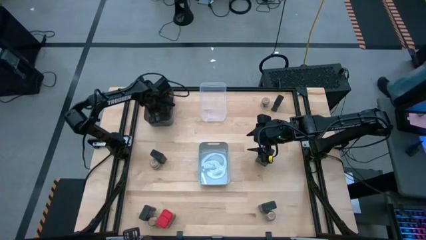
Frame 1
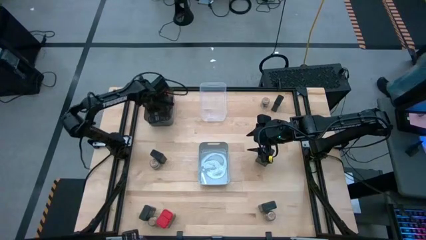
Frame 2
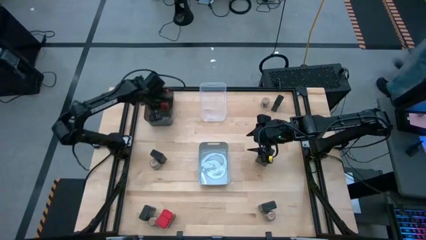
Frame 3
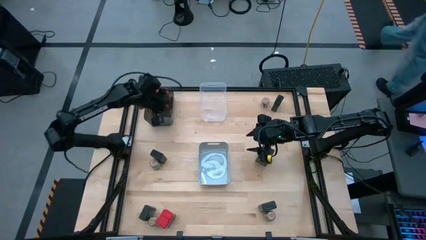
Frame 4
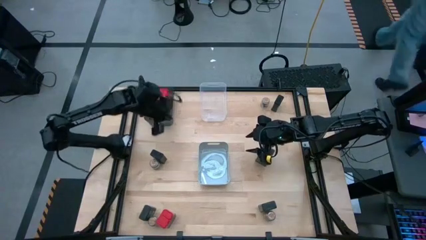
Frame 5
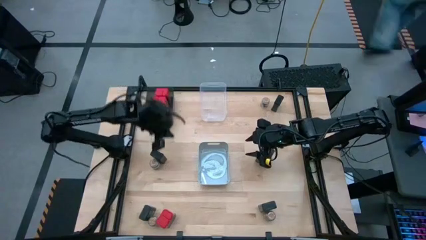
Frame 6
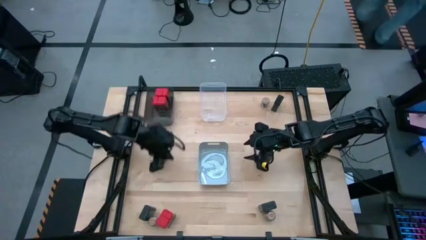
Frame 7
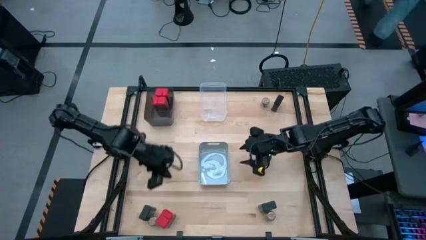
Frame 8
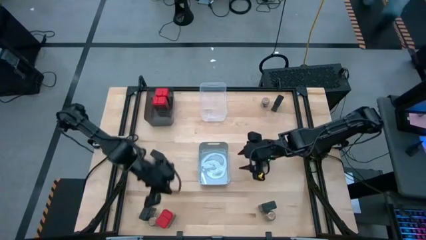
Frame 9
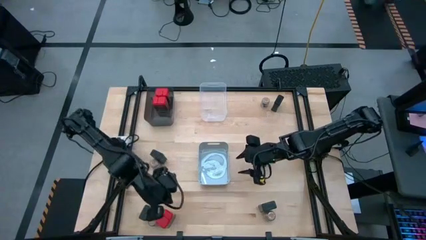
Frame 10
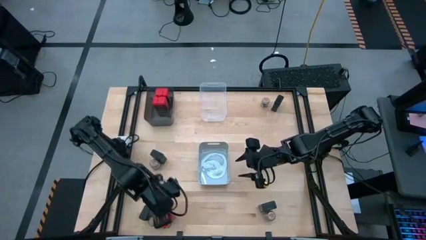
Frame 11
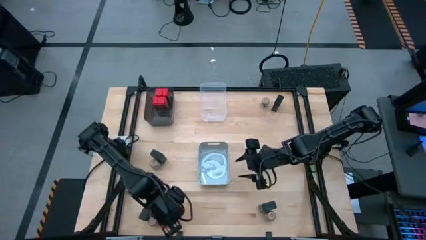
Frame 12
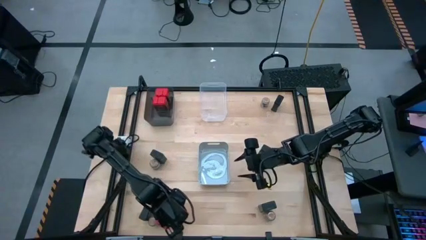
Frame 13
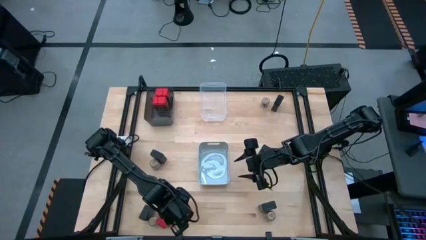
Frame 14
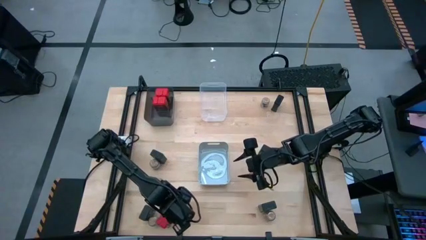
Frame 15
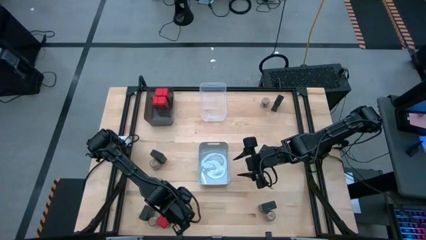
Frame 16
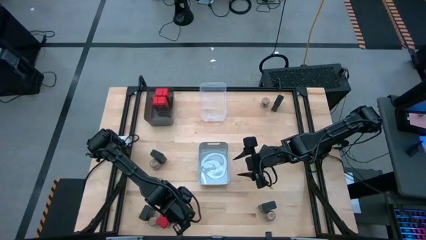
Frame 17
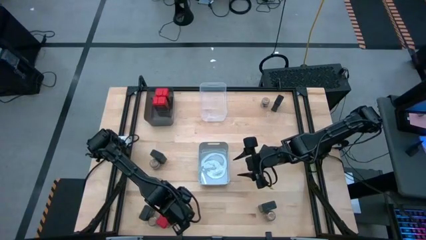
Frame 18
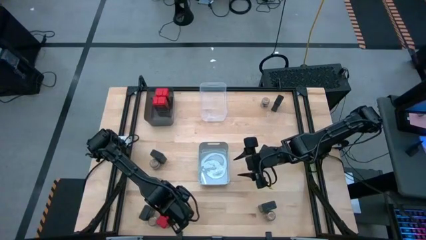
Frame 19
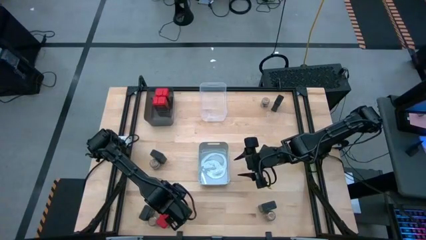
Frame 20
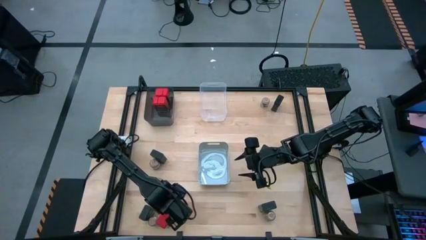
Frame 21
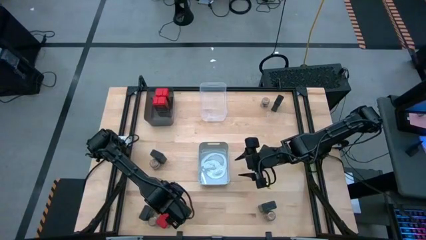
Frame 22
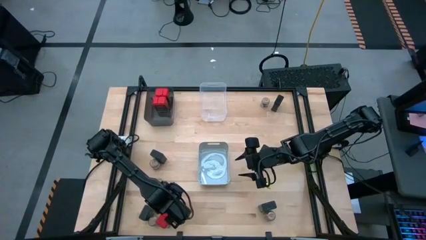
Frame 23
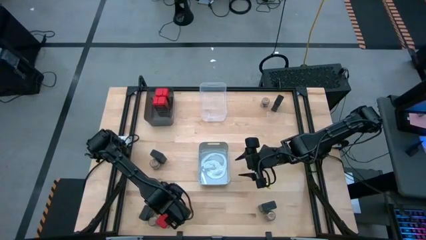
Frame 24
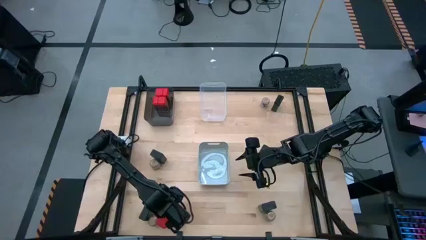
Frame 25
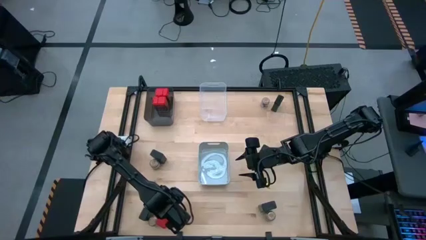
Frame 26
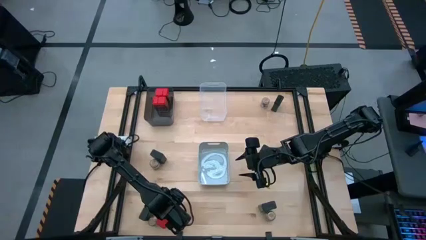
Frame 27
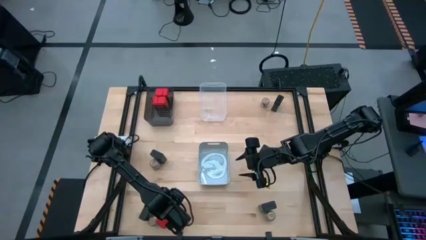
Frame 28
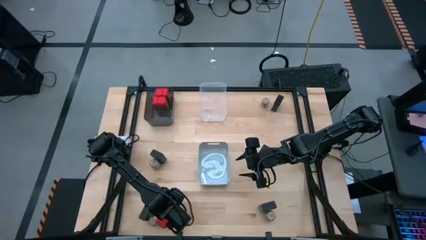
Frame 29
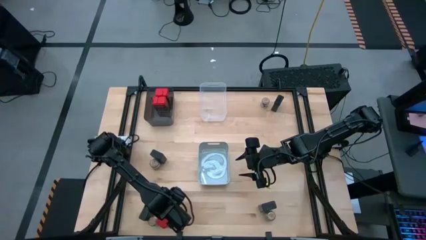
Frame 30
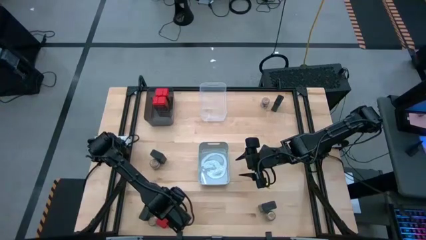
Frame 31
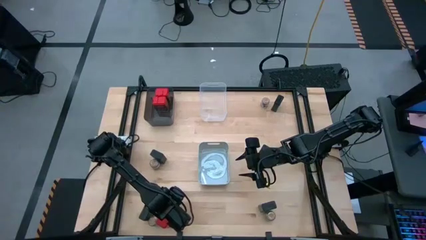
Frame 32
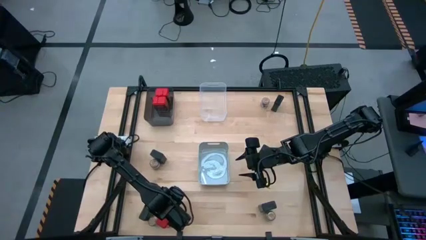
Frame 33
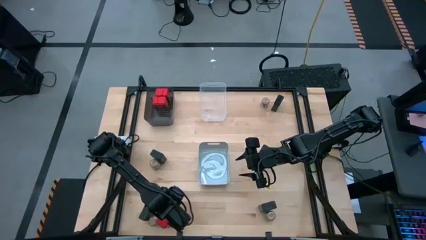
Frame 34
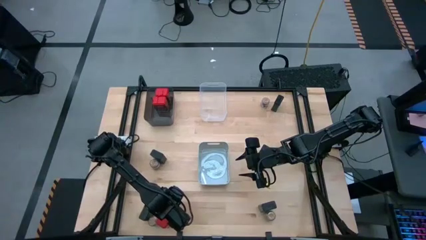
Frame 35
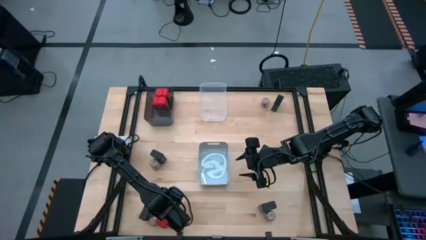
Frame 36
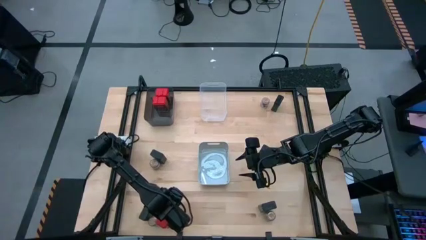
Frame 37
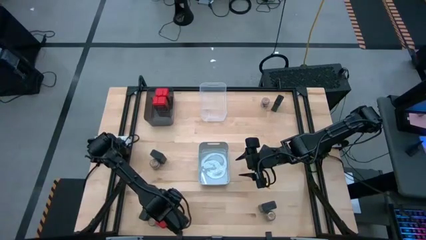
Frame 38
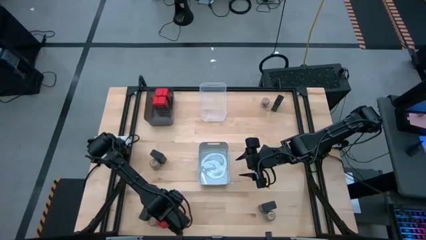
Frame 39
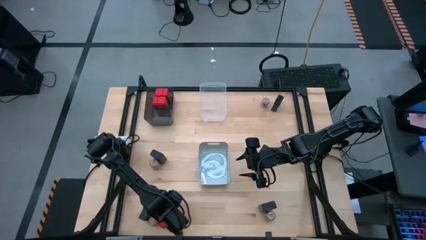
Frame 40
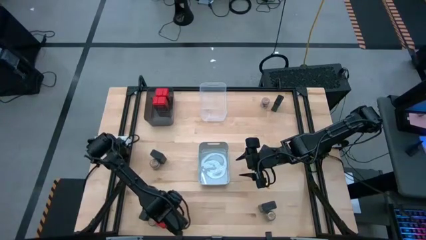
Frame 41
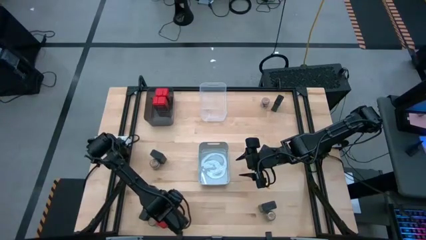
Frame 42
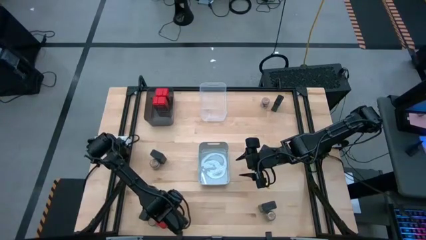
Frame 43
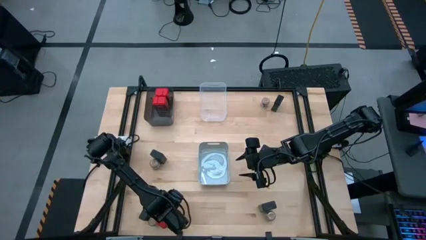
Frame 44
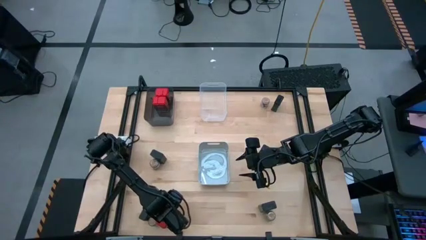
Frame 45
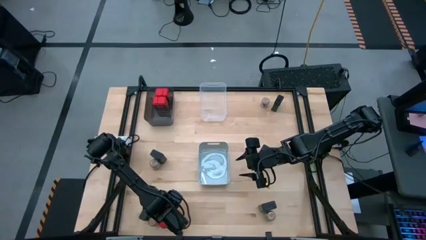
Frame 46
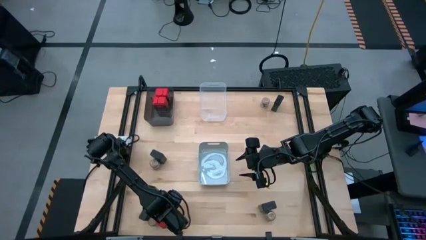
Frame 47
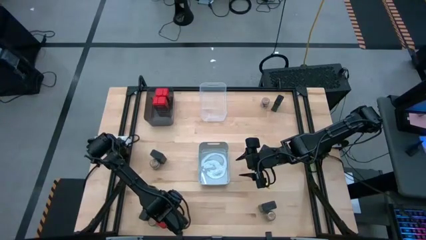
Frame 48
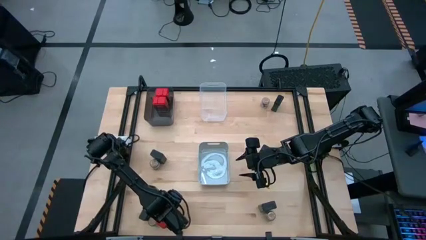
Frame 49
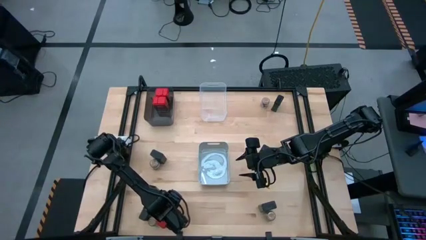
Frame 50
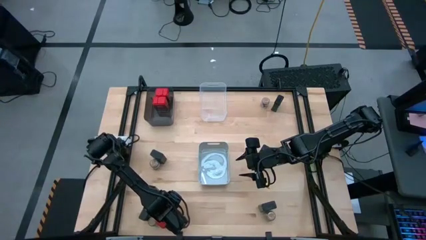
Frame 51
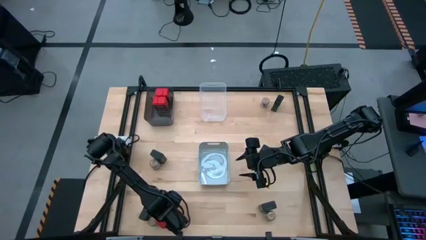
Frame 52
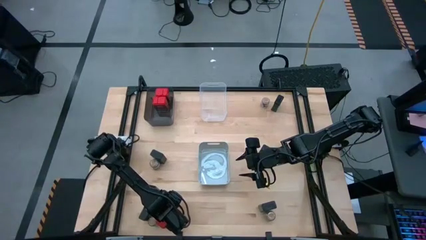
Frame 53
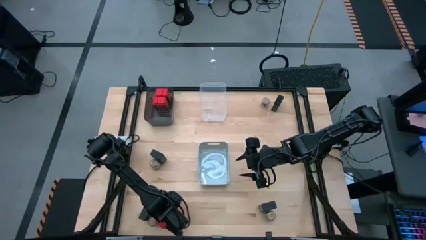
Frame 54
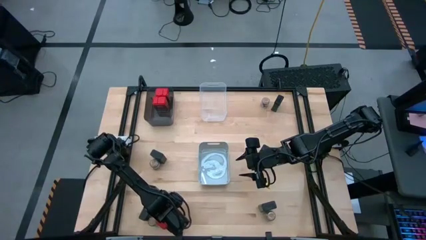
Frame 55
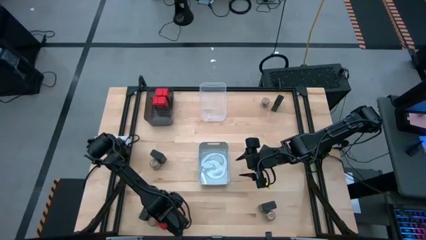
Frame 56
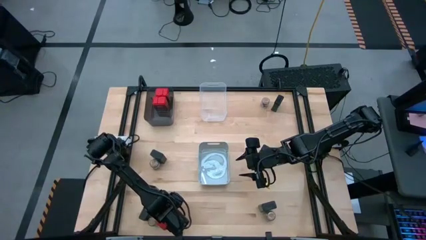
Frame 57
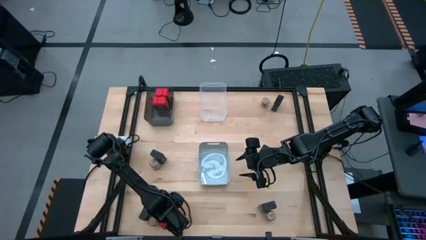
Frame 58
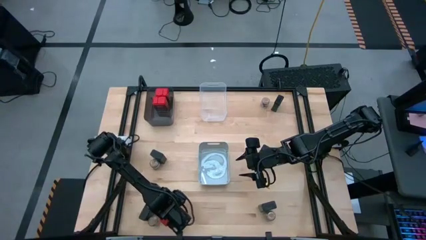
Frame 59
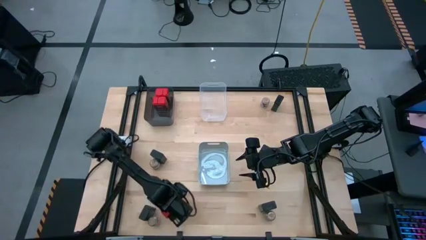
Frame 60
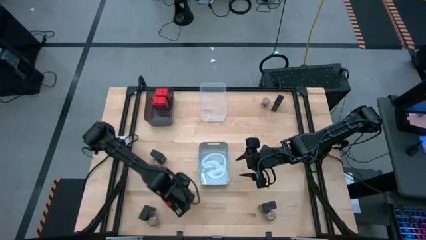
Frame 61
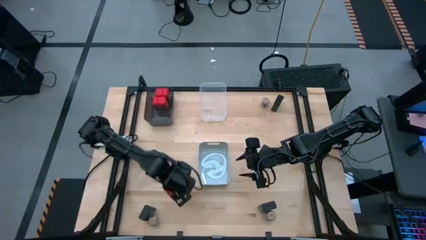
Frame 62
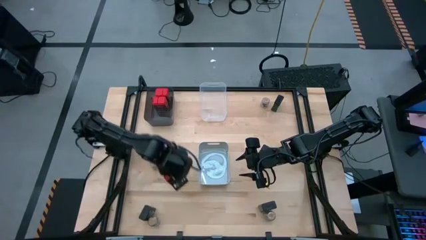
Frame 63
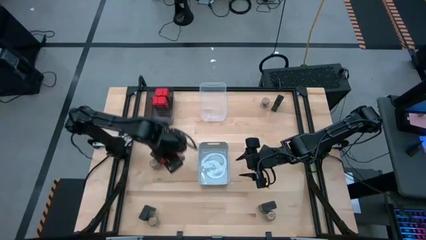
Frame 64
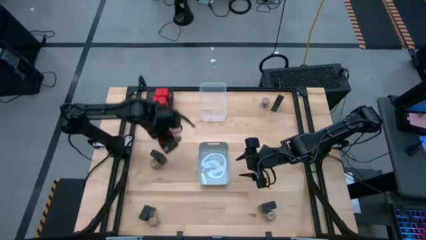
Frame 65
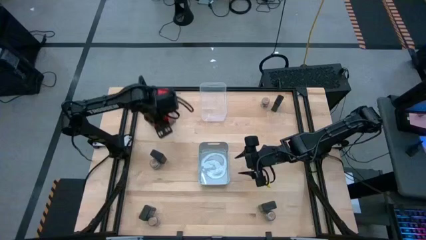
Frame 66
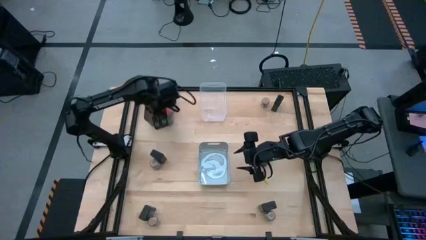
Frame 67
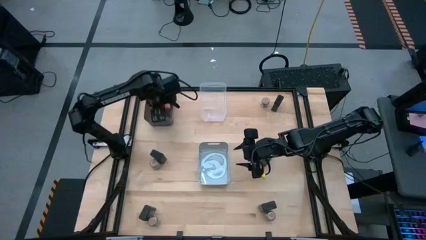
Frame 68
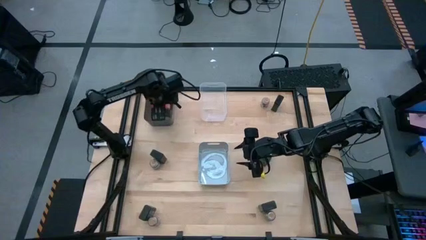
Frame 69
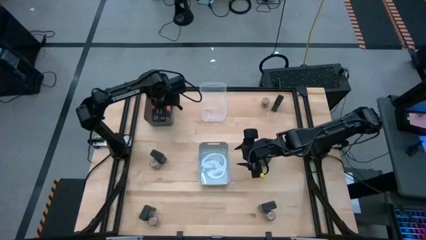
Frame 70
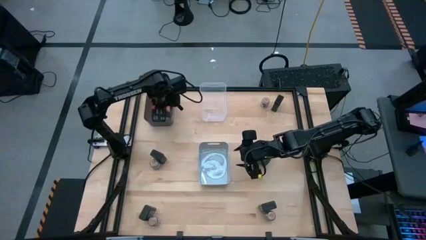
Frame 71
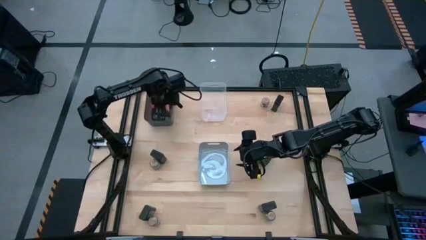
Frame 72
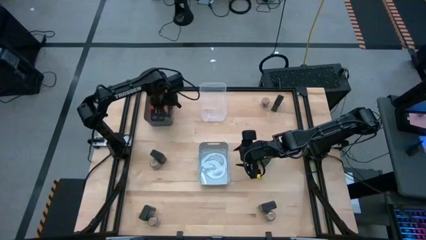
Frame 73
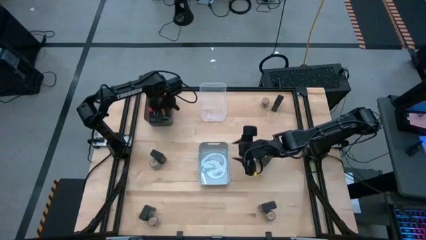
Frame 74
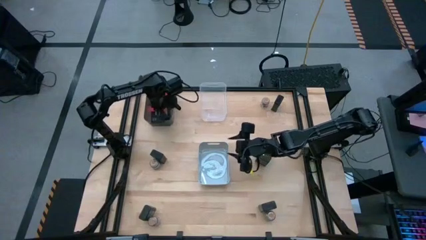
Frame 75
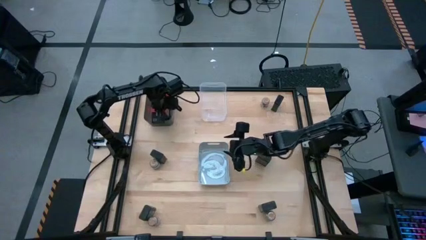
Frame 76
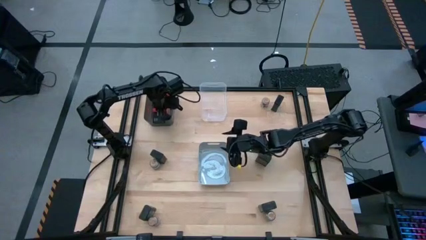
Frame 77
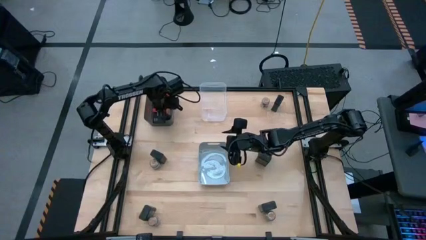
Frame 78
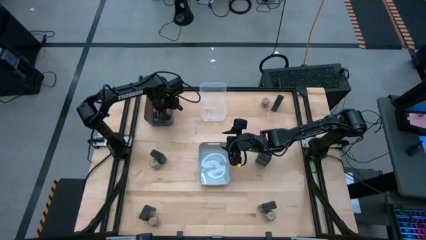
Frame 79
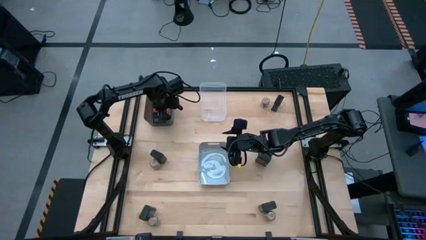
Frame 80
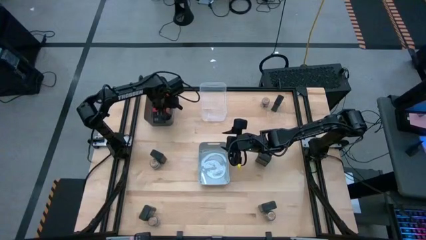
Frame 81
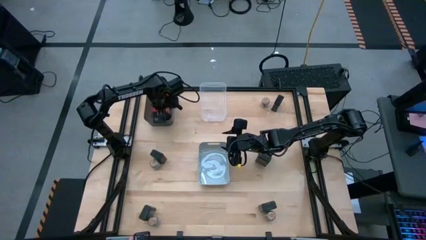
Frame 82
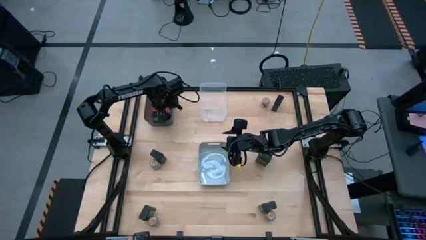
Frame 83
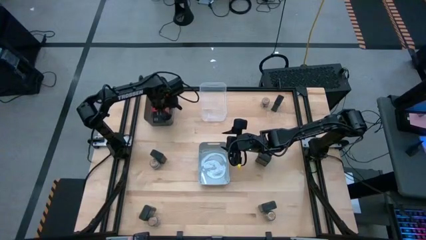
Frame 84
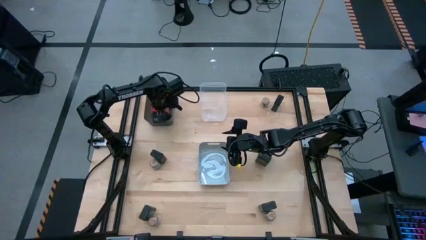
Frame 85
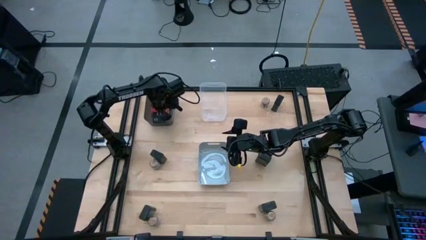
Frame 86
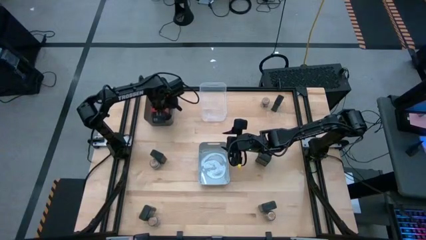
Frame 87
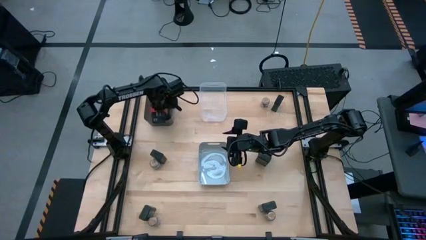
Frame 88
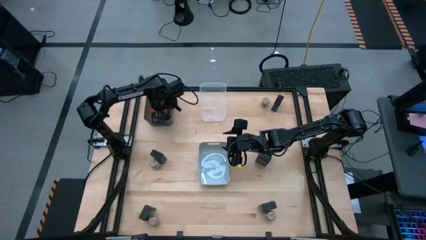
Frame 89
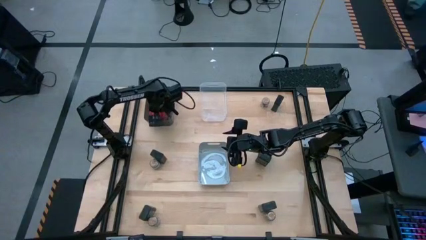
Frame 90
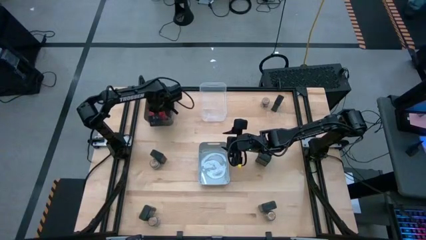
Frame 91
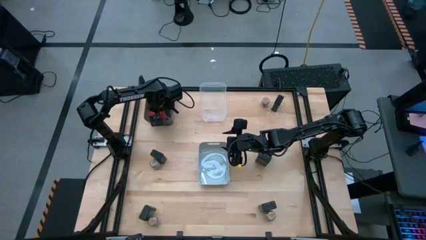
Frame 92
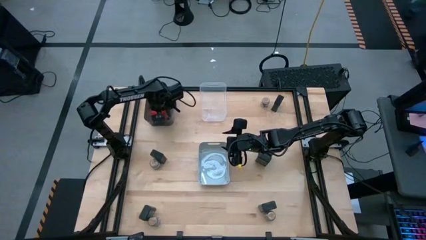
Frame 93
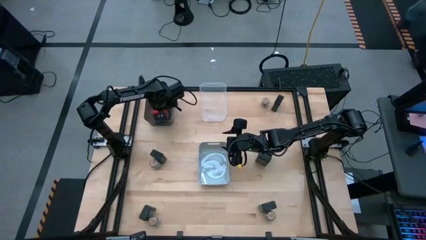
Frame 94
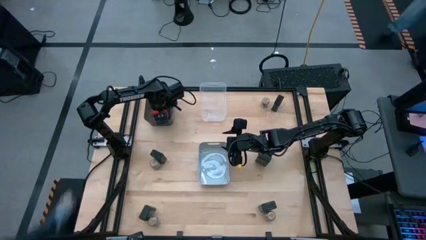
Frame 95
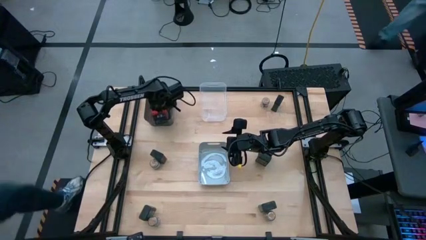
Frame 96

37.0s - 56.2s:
Task: Sort spices by type
Put the red seasoning can into the black transparent bin
